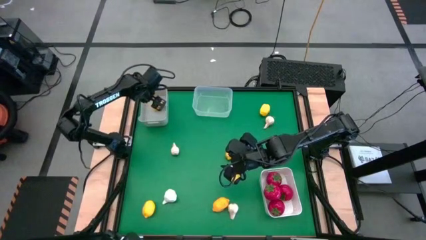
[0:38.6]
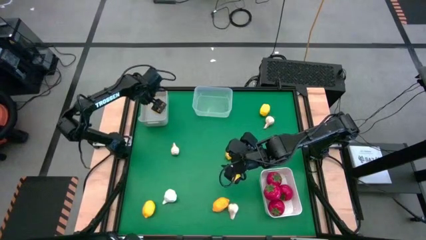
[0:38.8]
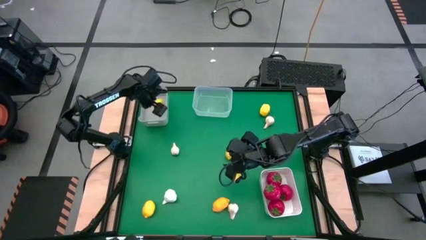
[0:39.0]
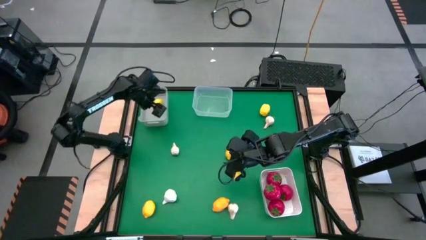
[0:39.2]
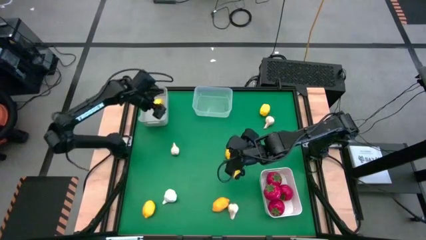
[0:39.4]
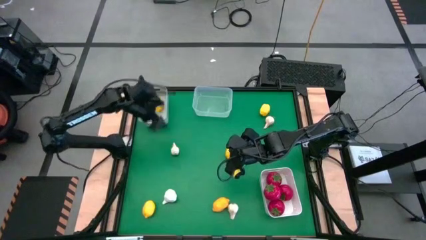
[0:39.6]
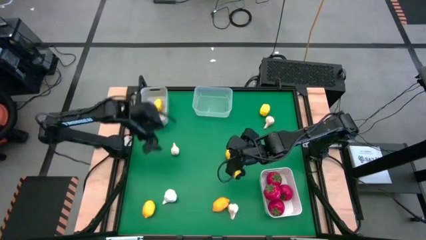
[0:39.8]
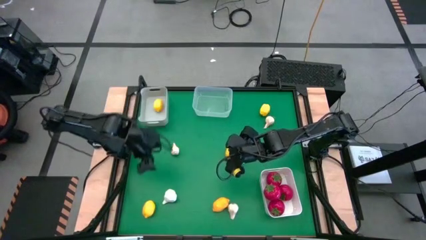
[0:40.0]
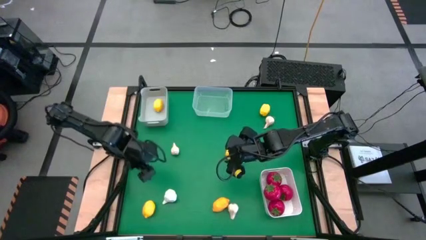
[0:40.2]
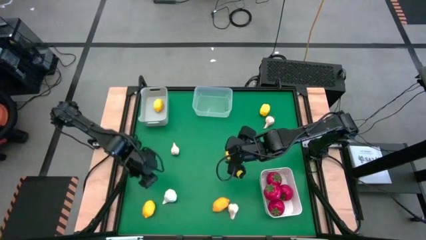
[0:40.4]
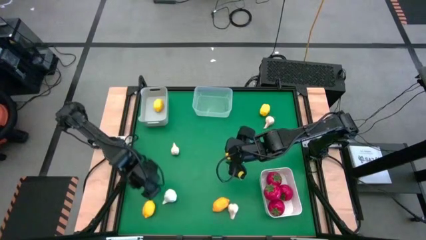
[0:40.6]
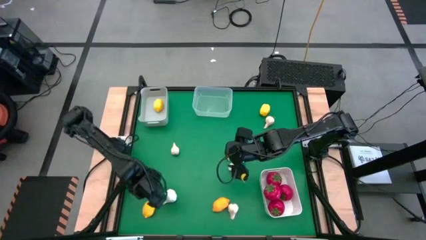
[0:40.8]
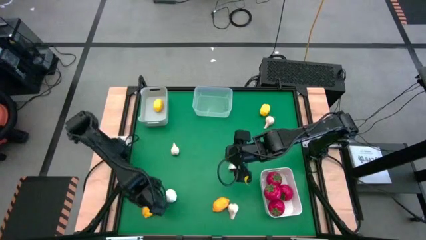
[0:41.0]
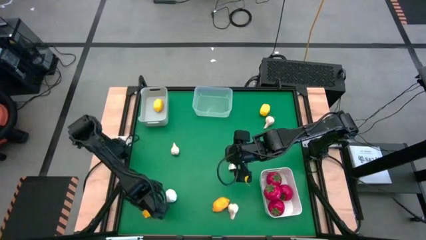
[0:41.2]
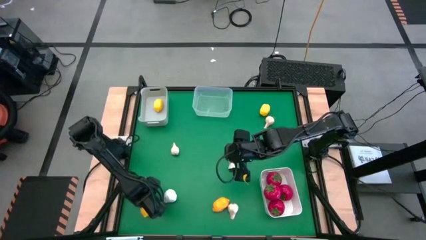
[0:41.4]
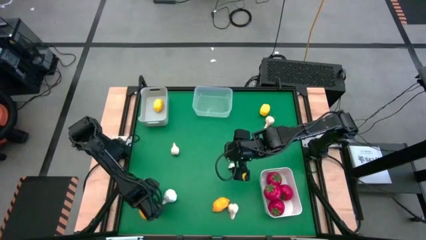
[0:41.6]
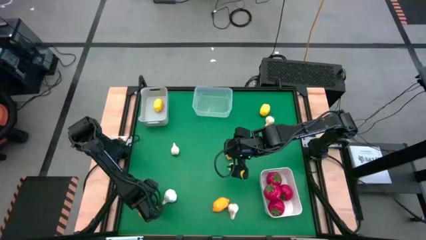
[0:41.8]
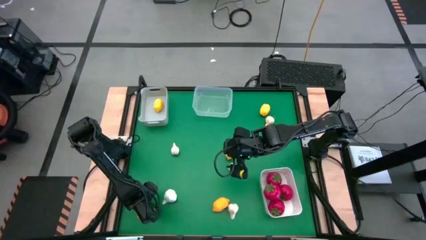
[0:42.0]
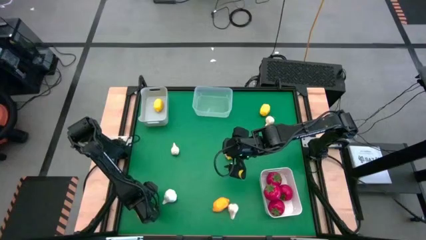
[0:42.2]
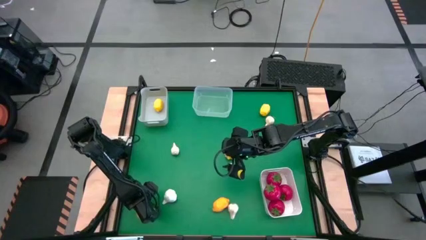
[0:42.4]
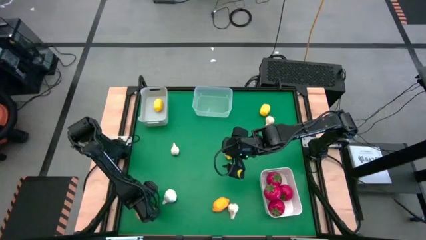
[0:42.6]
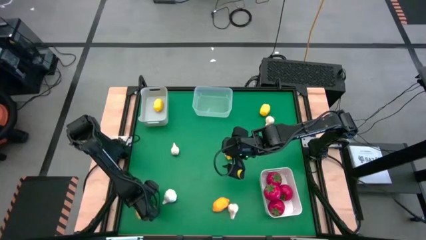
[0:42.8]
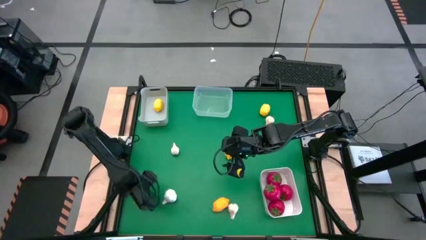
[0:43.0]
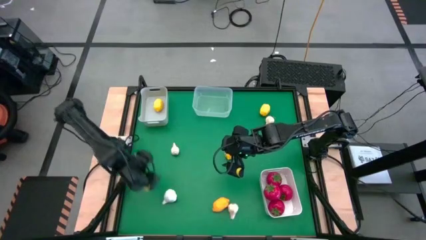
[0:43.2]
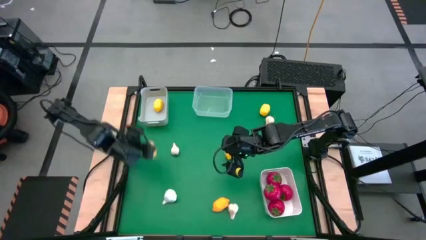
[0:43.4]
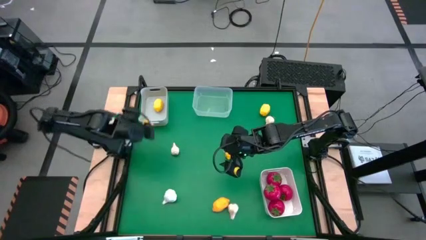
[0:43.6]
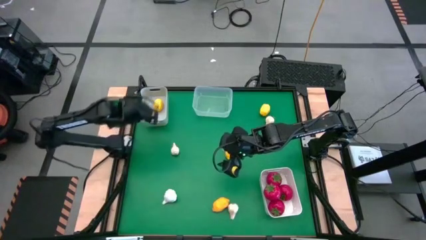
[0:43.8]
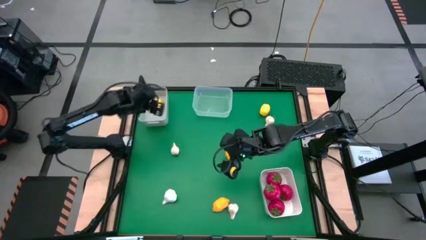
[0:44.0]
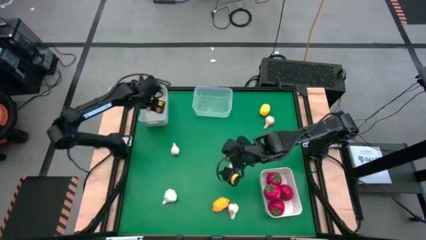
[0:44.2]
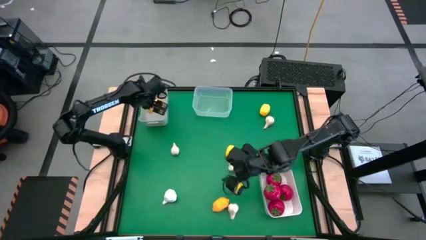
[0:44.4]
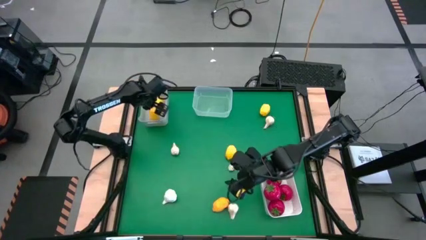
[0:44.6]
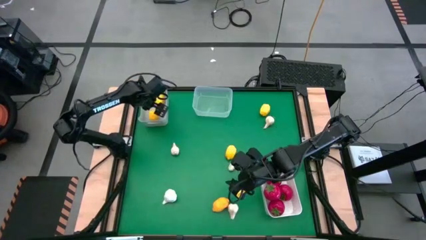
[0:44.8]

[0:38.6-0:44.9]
Task: Sort produce into baskets
Put the yellow lemon into the gray bin

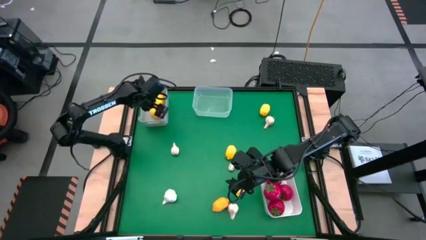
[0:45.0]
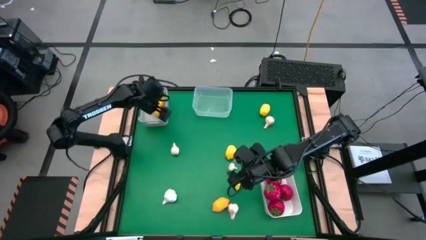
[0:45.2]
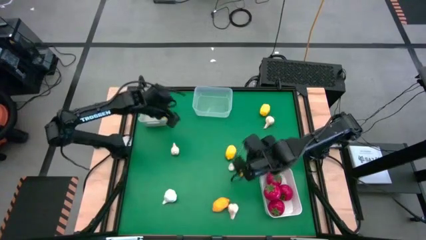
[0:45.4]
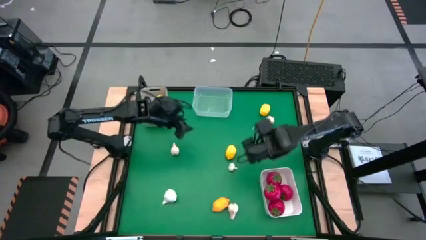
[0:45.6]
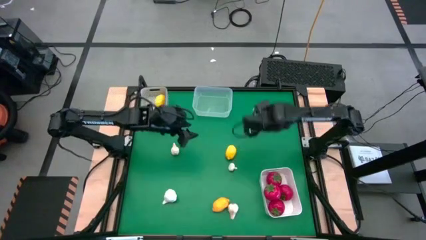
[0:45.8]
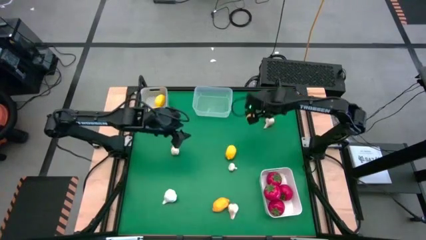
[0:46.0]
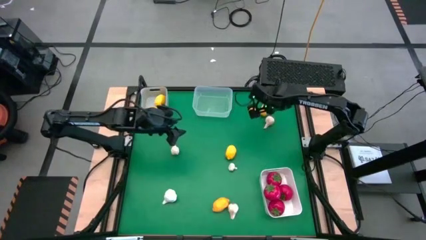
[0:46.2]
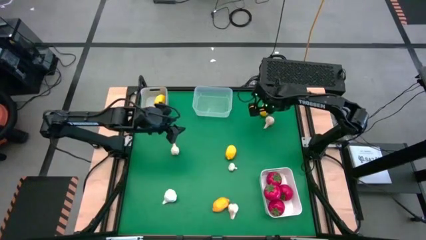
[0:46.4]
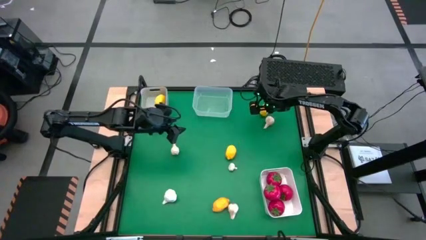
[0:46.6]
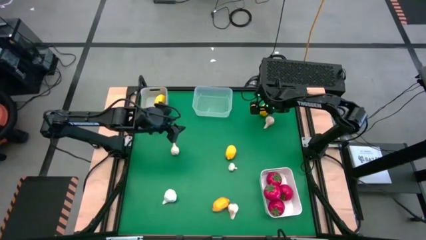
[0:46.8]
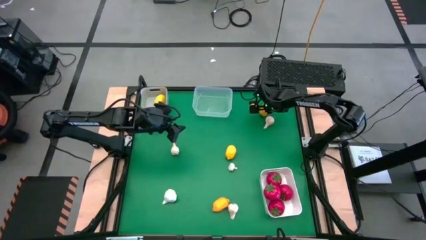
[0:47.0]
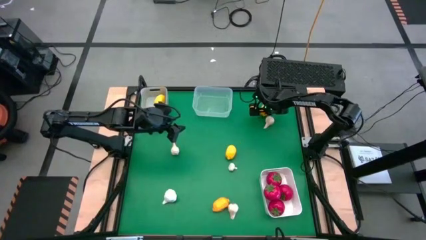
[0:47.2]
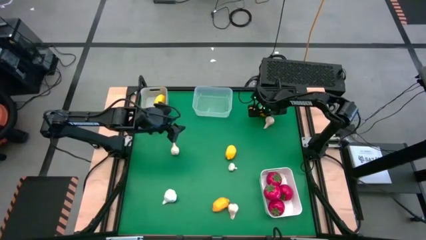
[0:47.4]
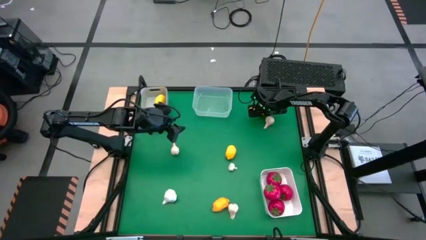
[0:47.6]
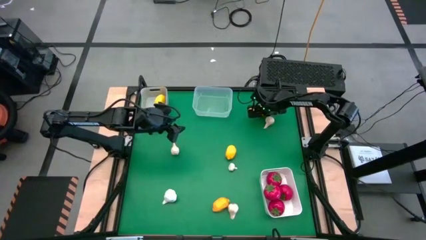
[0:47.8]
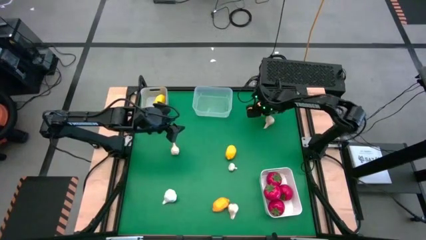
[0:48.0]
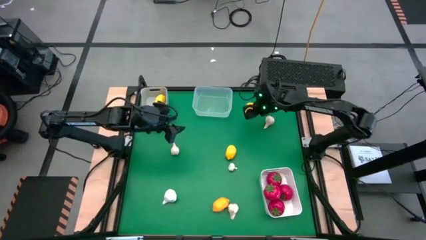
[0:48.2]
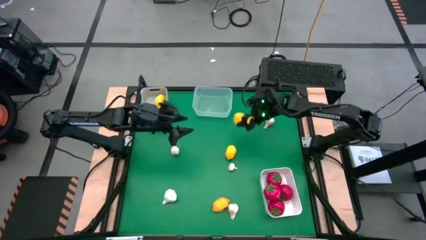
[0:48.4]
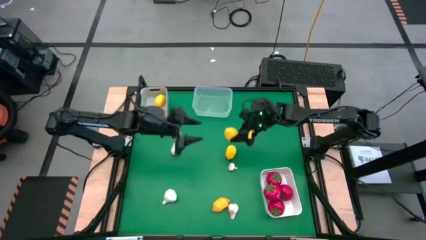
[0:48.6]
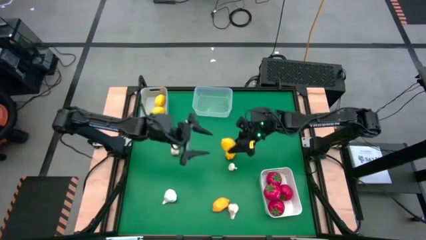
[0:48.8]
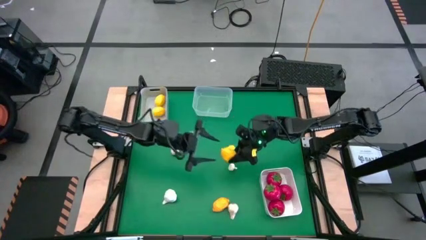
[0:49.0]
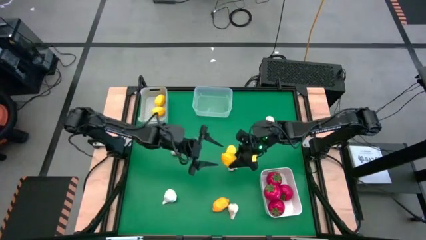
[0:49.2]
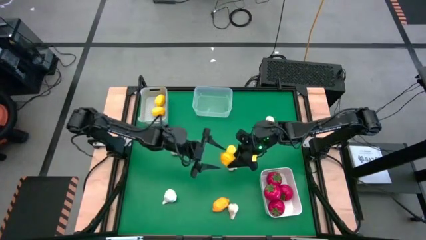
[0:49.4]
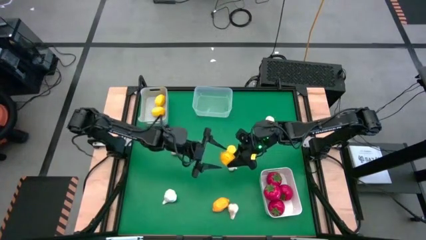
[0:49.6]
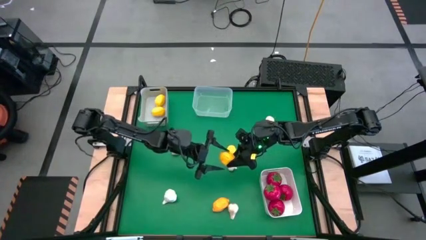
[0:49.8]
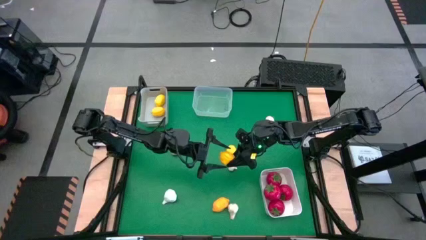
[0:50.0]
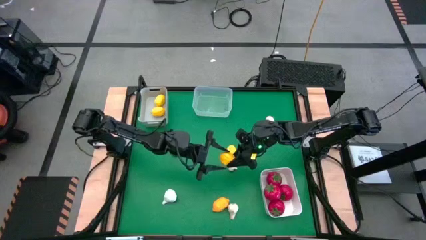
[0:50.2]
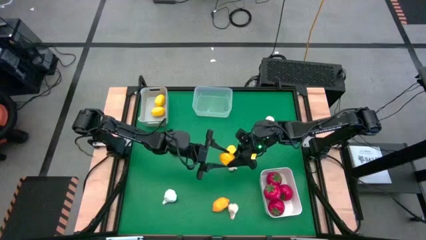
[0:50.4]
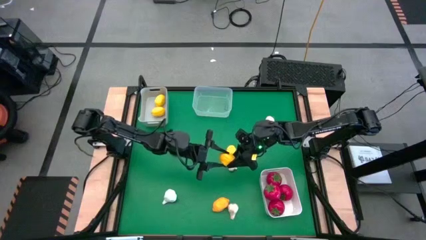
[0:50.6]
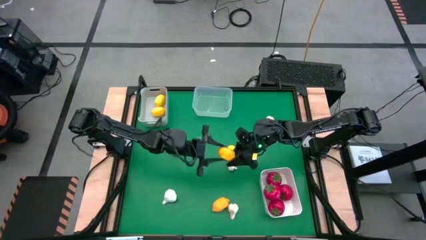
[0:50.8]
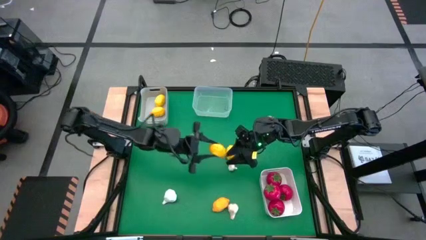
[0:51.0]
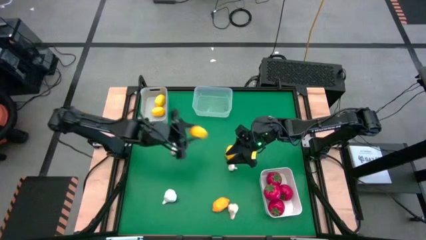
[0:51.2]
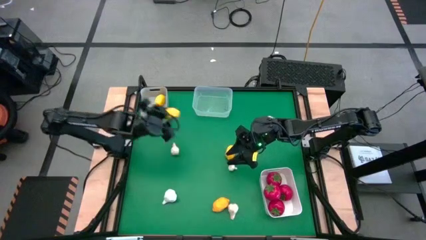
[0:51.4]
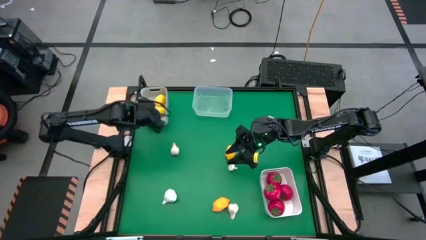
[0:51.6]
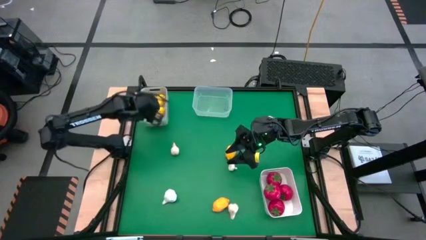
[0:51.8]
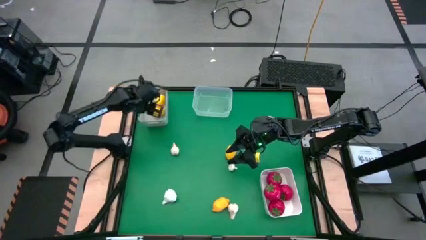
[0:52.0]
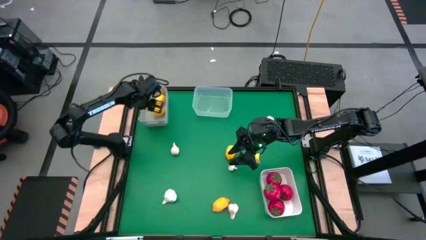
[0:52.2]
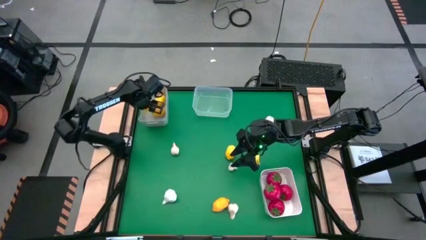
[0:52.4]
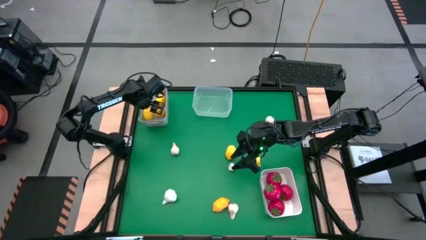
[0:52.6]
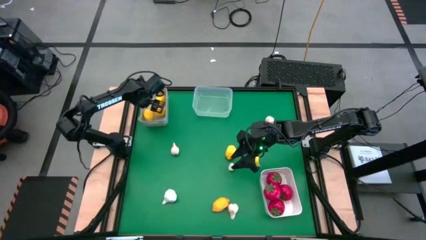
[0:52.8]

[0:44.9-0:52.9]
Put the yellow lemon into the gray bin

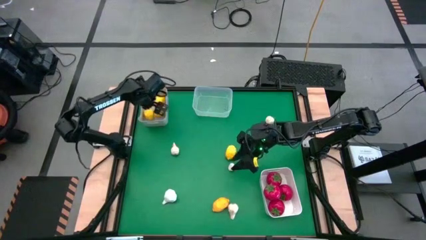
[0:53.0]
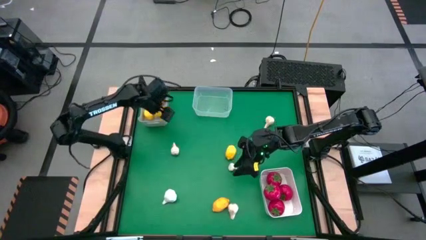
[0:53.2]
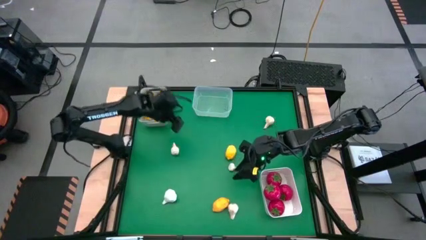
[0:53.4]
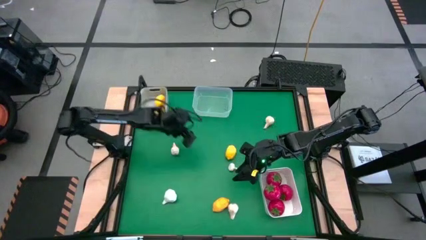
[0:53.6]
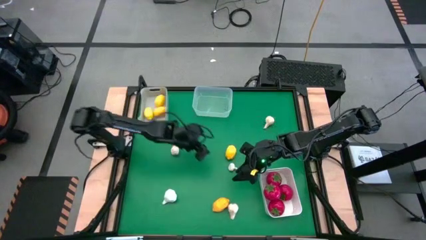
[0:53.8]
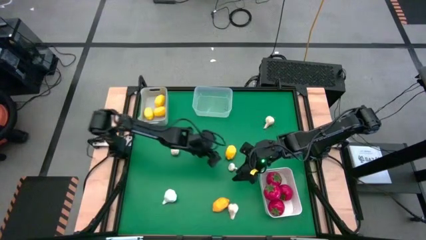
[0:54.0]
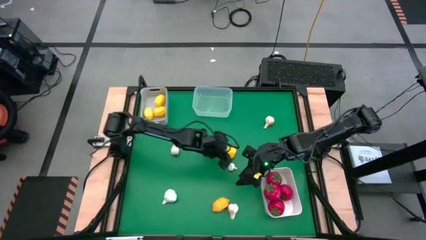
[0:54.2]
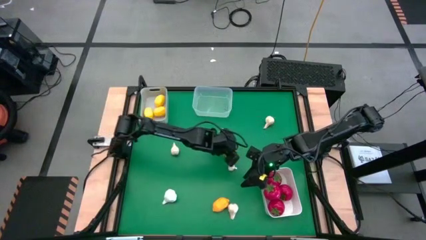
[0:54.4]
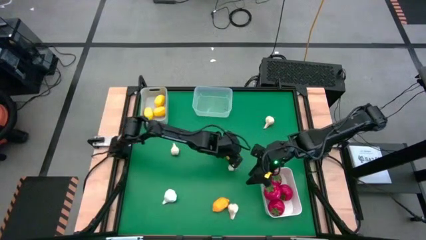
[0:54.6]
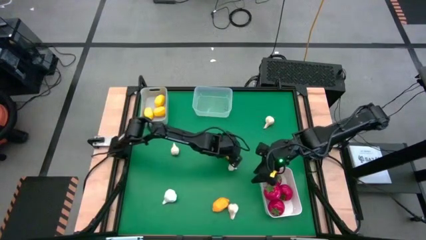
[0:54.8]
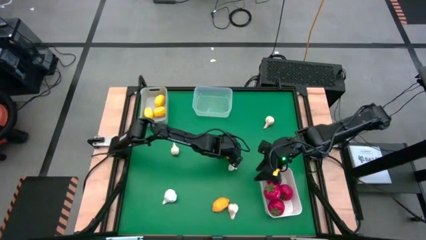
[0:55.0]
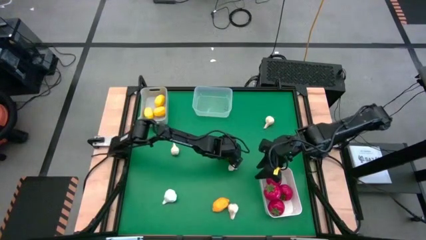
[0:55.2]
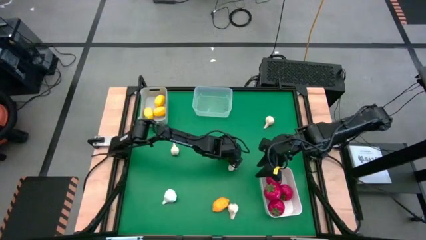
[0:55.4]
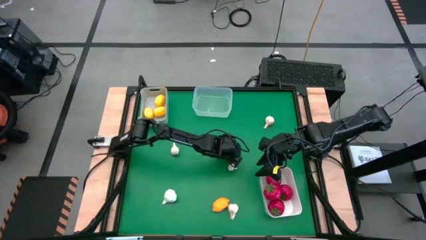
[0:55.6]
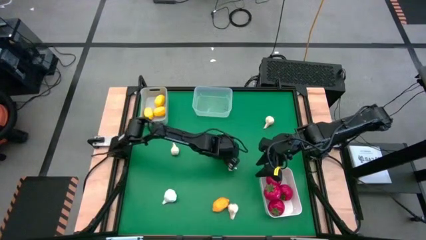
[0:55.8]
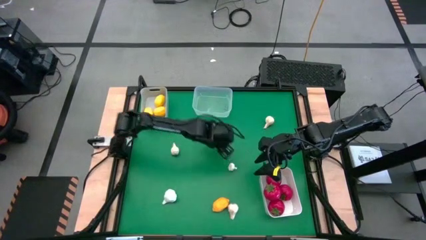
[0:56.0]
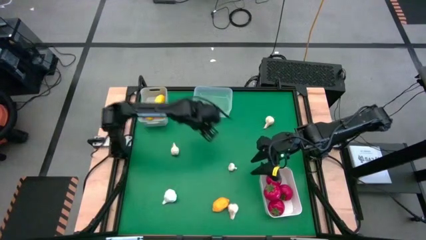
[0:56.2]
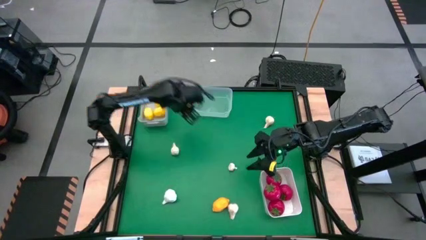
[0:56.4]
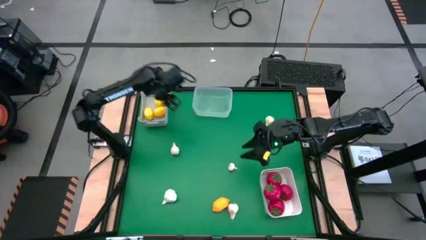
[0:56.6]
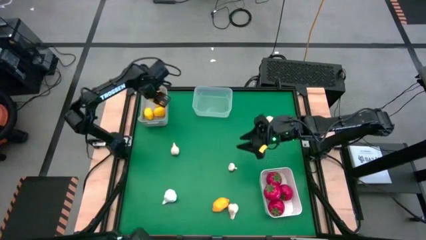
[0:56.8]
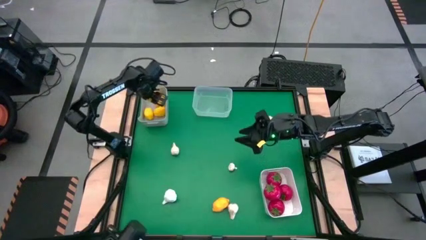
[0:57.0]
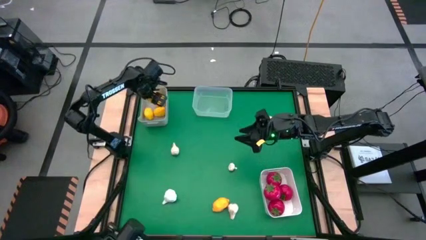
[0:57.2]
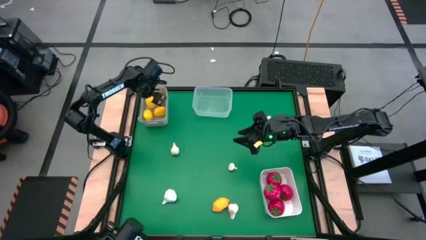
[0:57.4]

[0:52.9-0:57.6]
Put the yellow lemon into the gray bin
